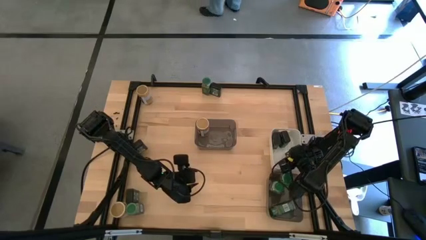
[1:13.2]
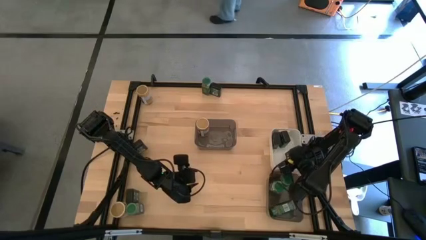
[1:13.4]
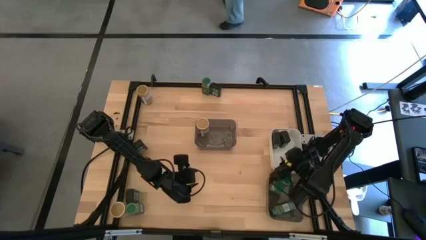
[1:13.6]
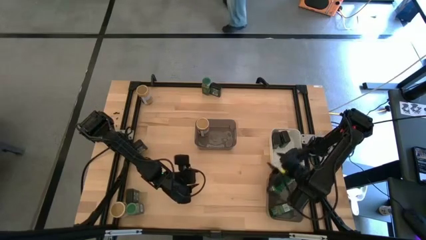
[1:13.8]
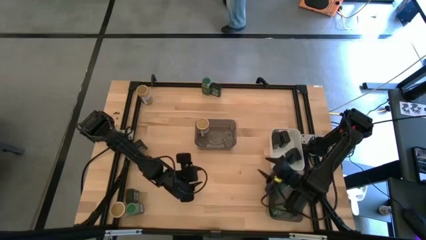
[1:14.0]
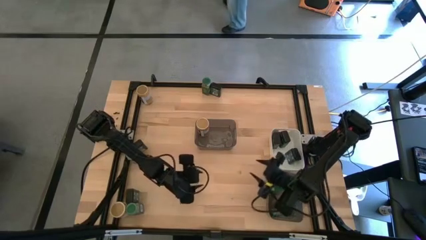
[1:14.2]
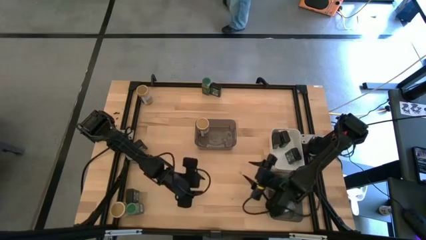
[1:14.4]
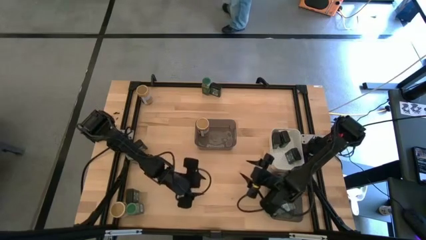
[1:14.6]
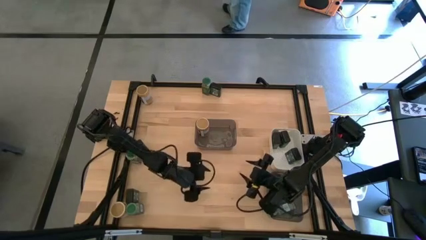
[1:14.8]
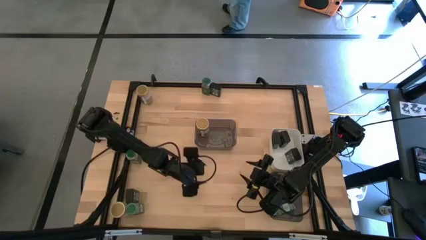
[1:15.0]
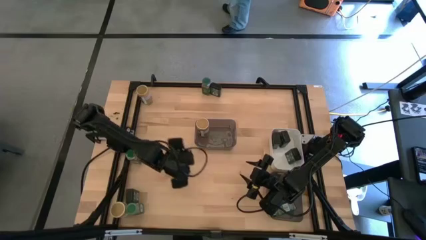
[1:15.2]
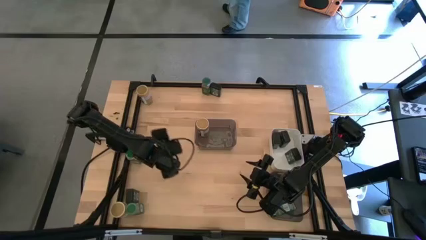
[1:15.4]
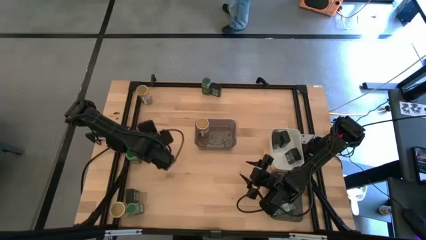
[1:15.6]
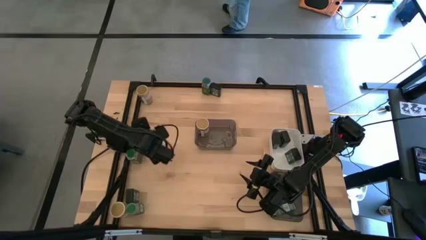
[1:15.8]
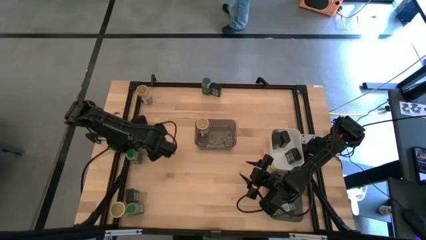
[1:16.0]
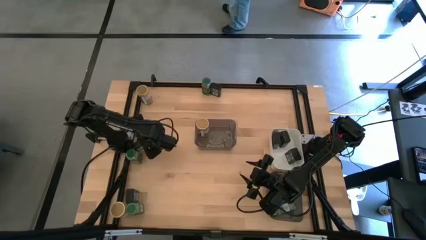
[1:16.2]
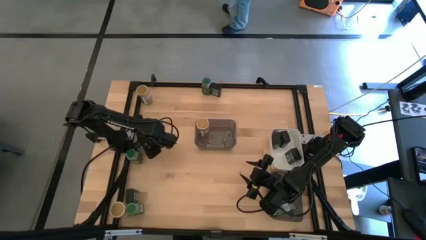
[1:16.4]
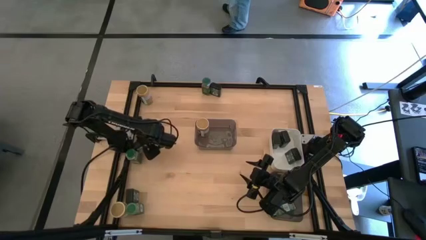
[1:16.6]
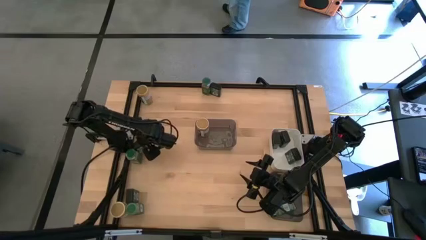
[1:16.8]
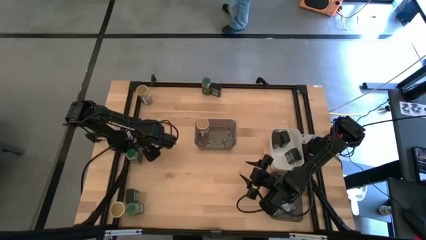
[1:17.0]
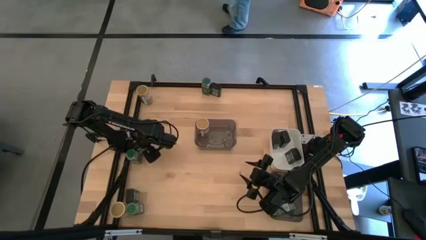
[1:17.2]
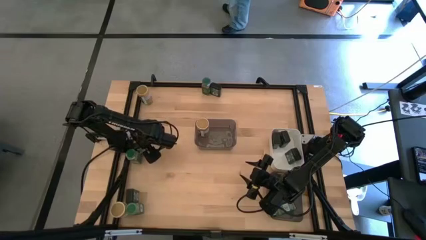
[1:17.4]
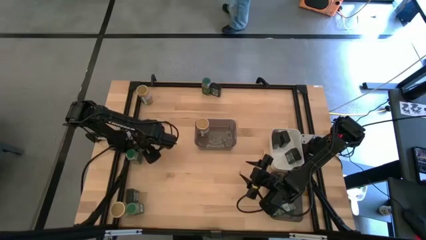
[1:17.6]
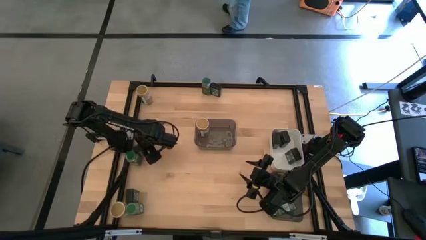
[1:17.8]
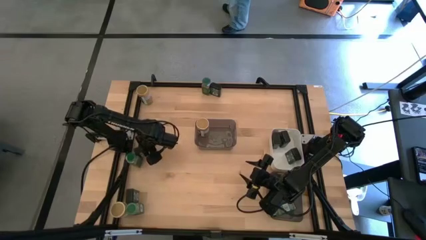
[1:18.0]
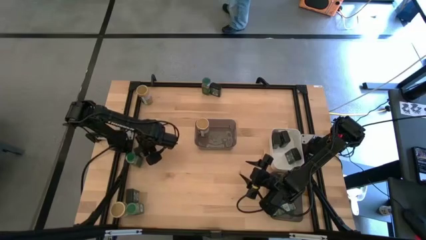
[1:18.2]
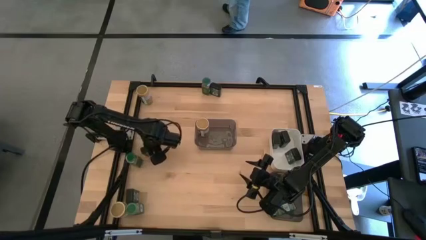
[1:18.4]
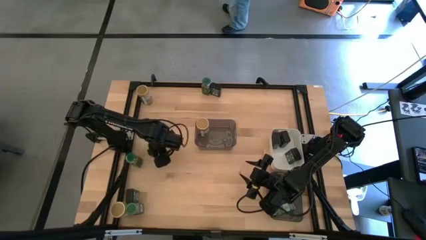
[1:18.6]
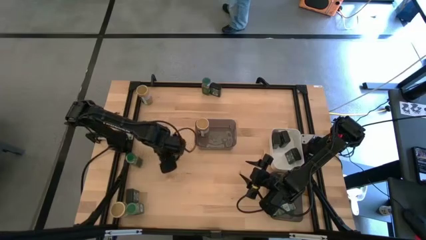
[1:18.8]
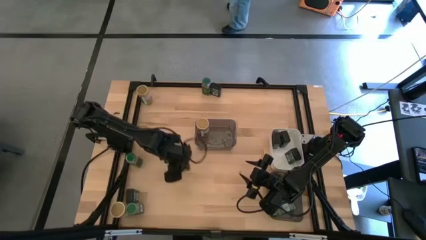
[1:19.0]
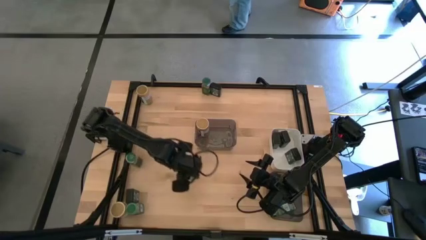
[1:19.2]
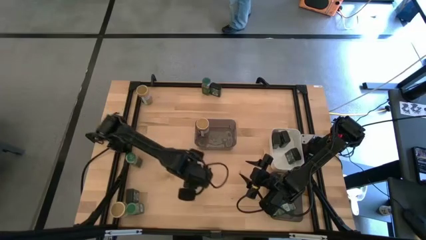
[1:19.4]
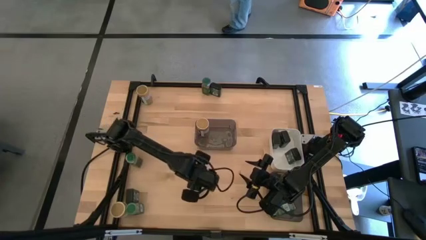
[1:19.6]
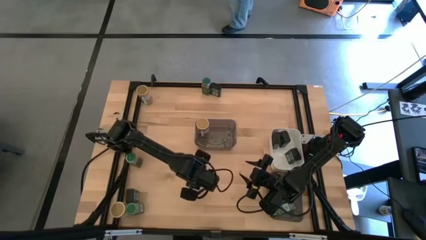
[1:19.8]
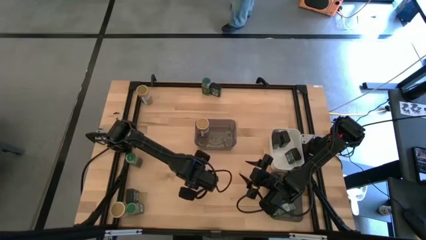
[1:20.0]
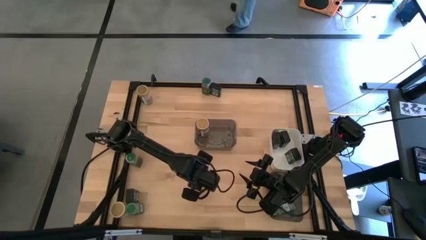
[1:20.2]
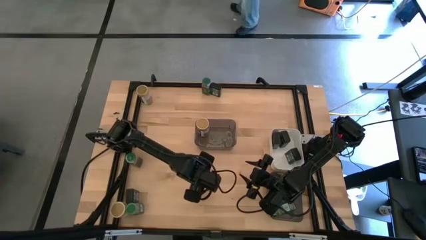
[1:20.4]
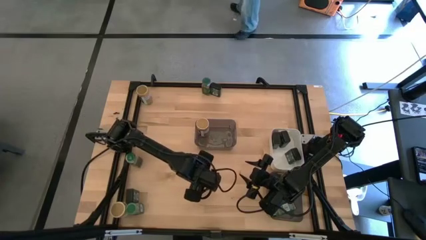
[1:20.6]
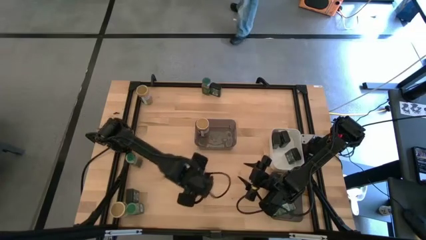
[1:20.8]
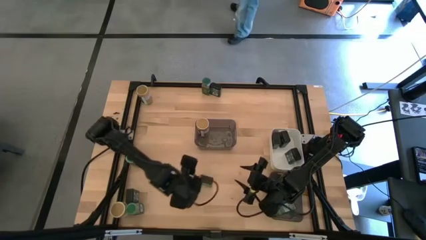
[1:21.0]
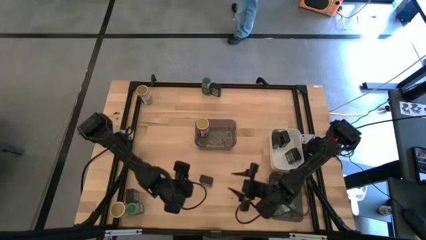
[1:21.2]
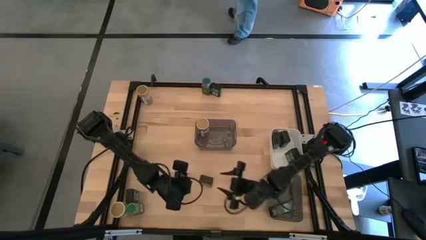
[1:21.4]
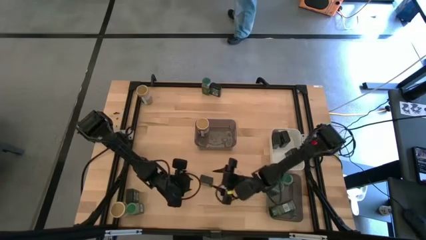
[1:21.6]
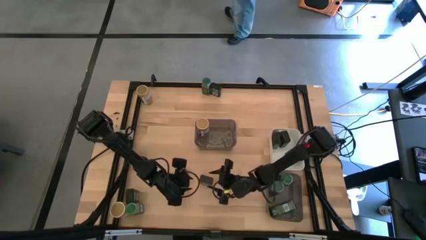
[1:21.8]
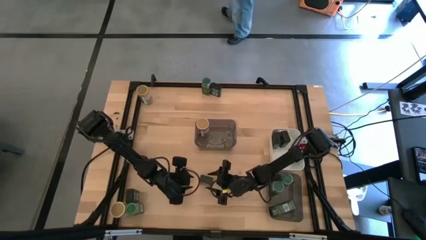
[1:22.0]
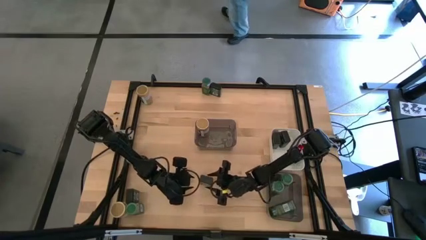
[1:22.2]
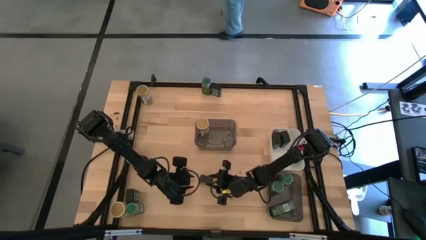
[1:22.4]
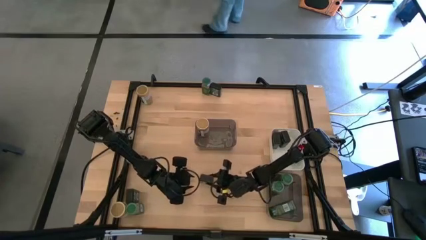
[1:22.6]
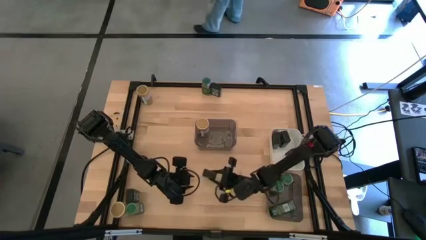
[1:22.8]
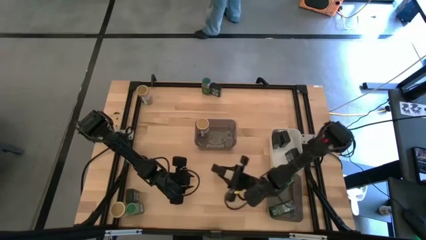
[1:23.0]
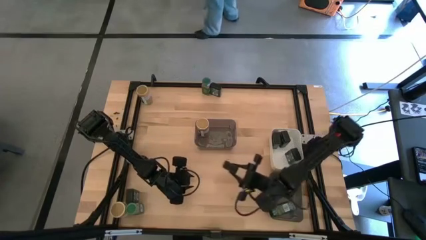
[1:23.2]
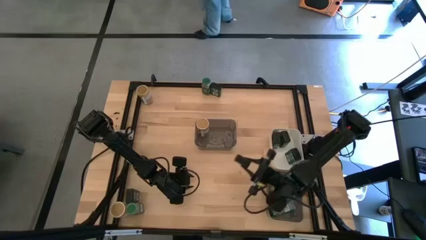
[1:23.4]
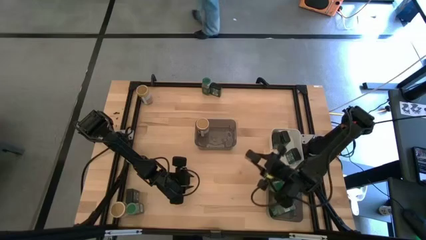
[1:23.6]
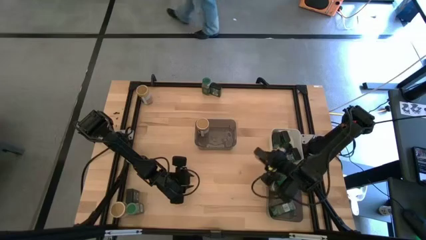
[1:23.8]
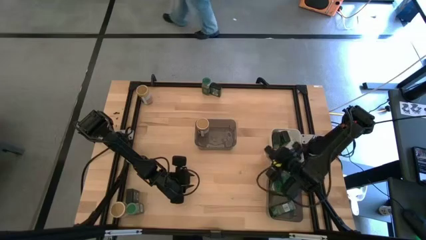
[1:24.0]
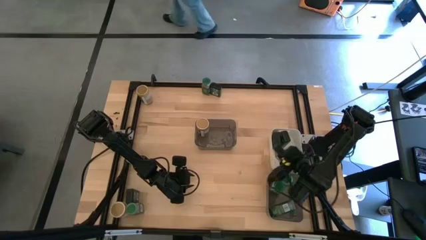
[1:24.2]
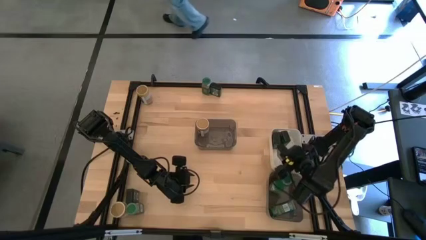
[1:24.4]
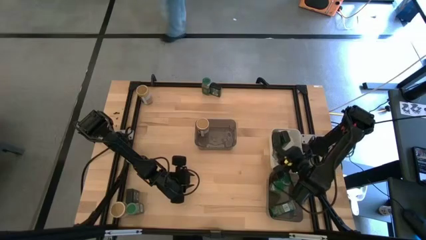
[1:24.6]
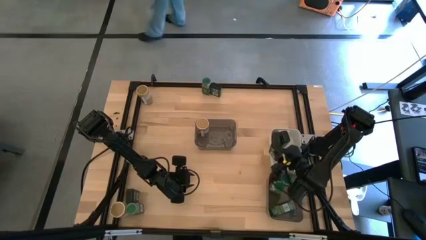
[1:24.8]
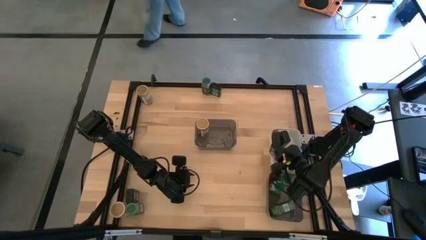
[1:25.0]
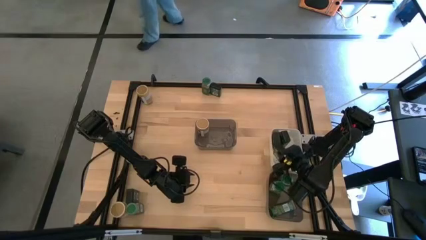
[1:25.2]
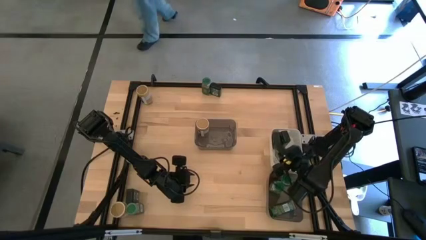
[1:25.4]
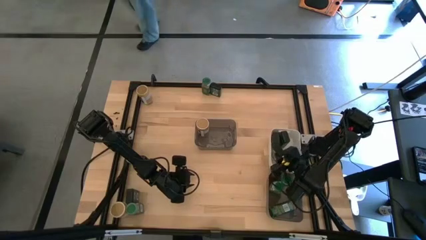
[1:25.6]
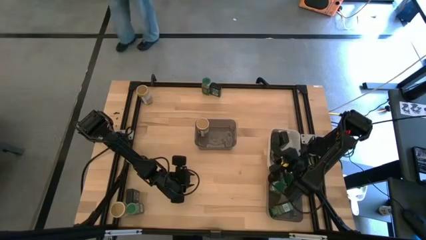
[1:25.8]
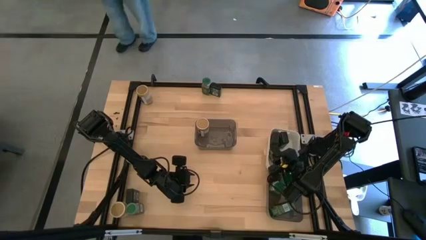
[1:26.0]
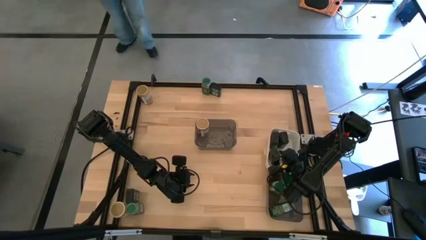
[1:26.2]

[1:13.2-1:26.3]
Task: Sort spices by type
Put the center black seasoning can into the white bin

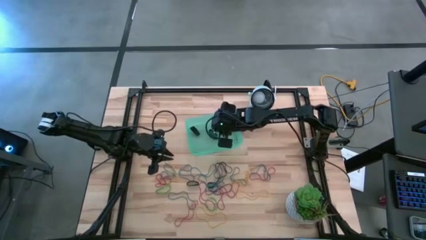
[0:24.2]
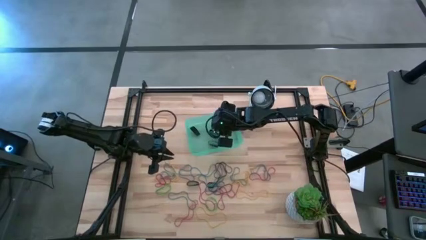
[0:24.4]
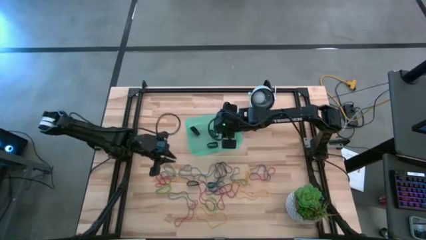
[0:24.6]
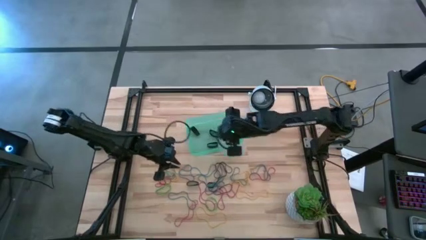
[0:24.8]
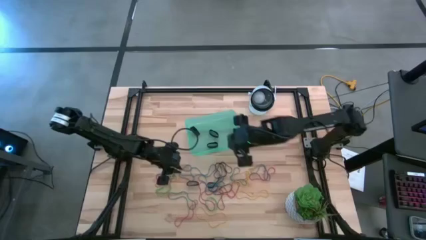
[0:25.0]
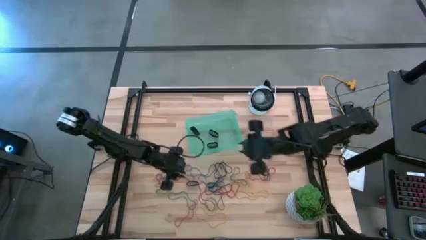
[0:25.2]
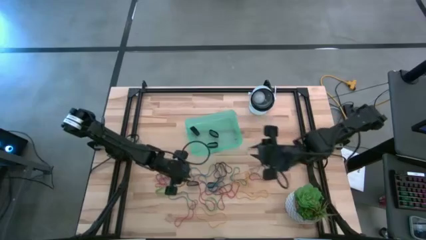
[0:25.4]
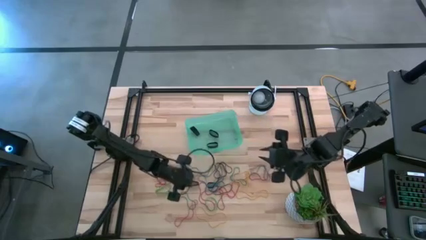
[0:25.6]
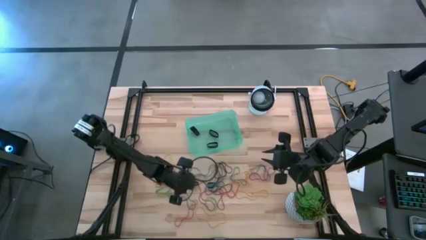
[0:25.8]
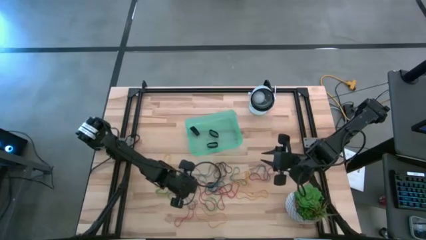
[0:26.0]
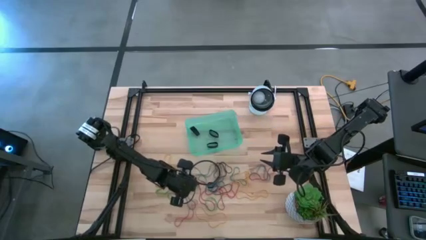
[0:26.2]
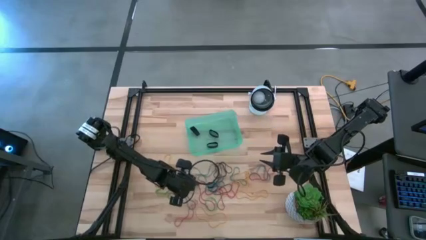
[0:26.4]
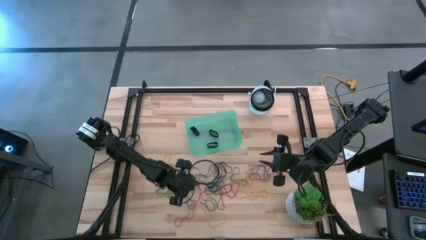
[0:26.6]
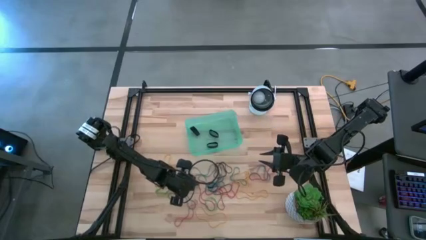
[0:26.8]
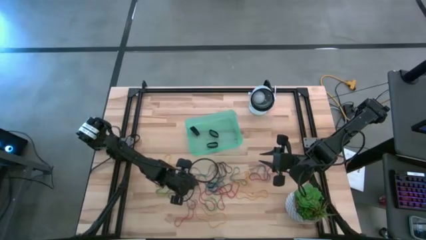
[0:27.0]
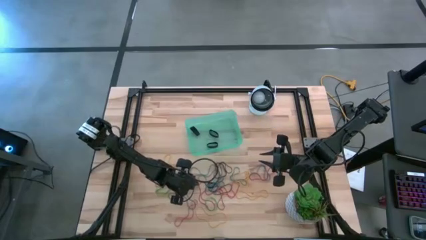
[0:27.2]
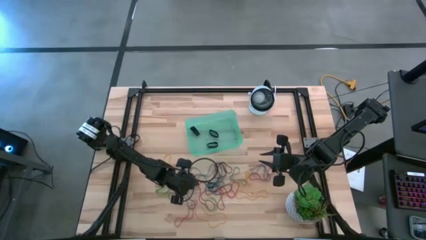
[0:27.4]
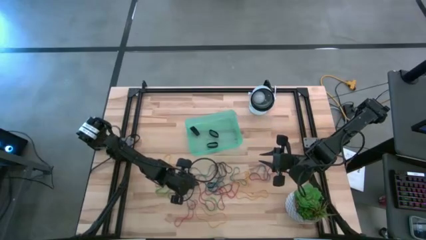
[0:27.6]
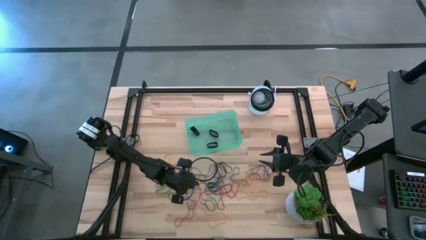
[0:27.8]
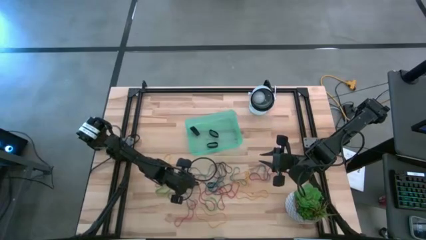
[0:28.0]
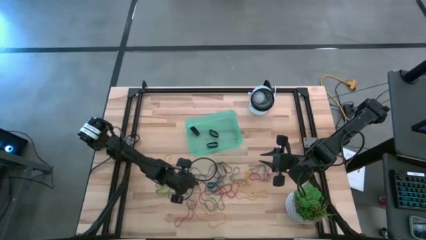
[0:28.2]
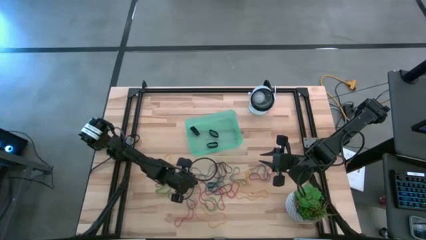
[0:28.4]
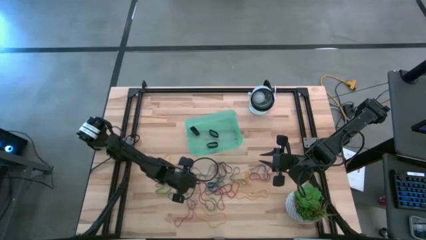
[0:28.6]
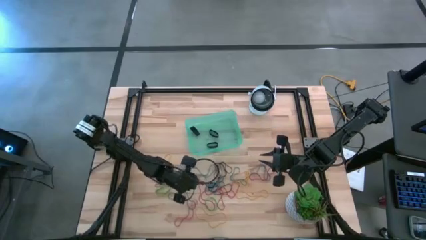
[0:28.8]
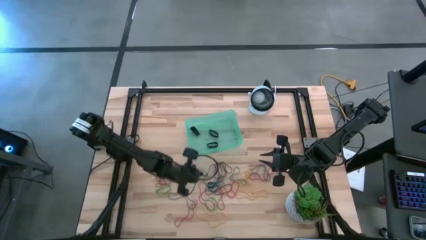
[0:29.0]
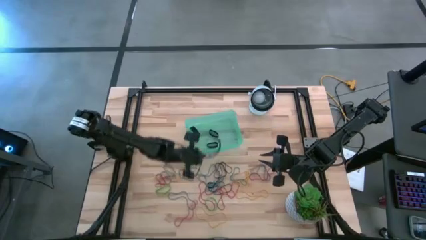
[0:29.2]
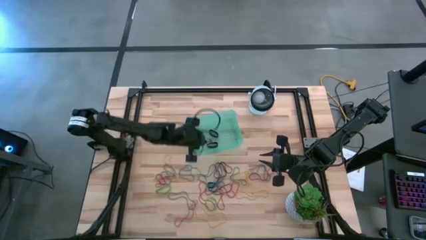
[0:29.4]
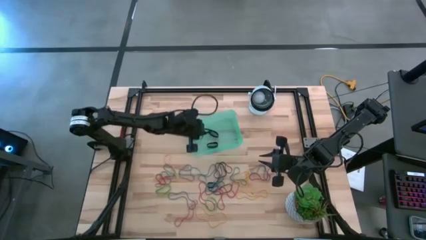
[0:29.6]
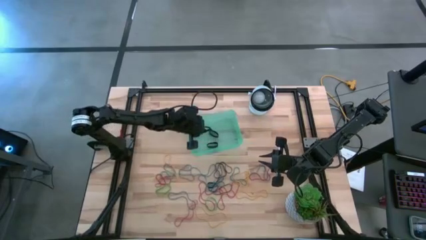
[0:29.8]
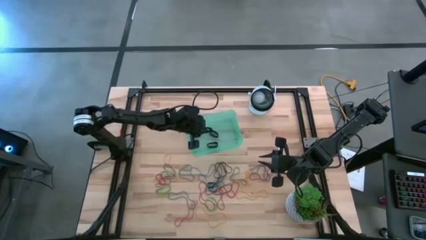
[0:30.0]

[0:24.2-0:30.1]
Task: Pick and place rubber bands into bin
Put the black rubber band into the green bin
